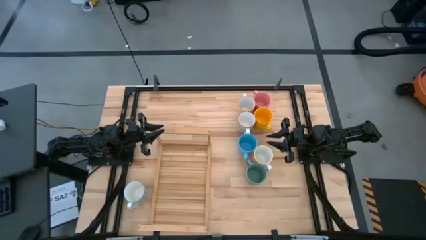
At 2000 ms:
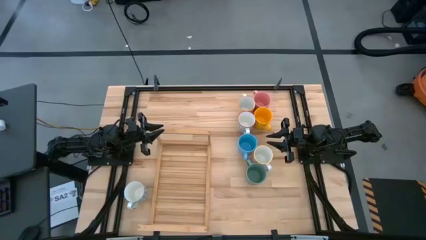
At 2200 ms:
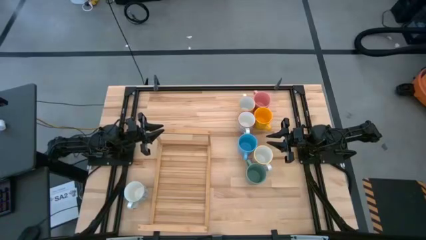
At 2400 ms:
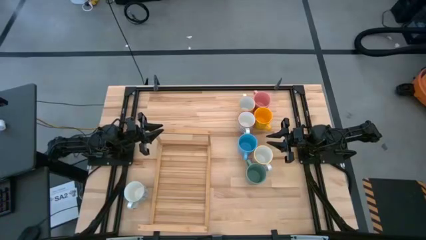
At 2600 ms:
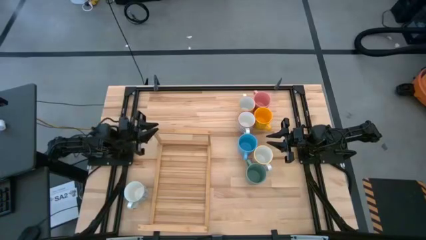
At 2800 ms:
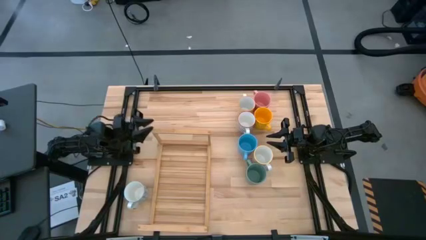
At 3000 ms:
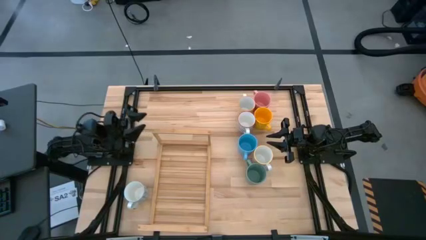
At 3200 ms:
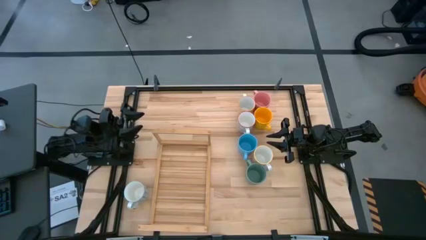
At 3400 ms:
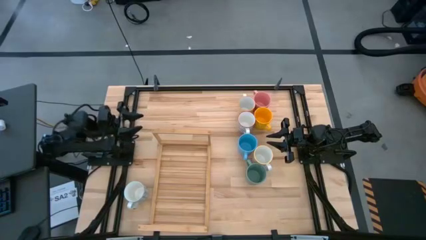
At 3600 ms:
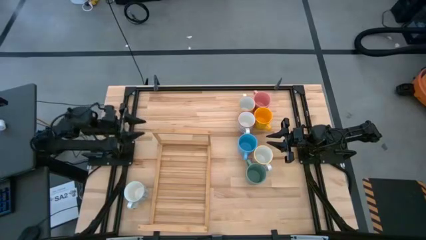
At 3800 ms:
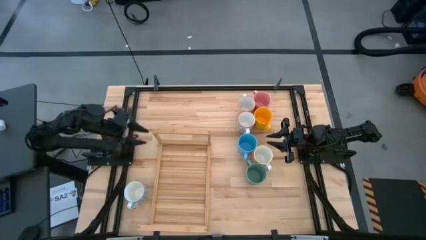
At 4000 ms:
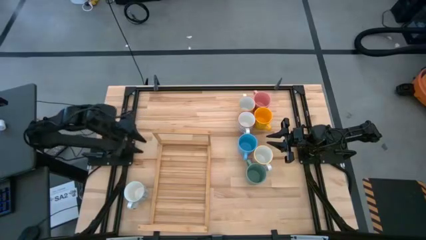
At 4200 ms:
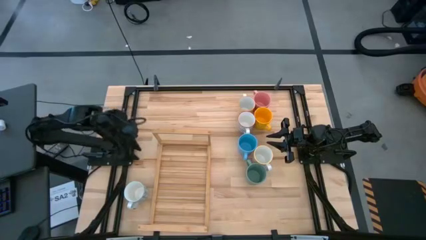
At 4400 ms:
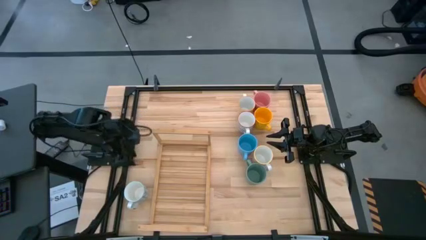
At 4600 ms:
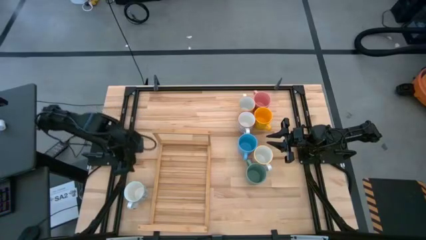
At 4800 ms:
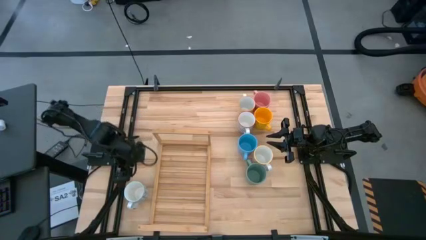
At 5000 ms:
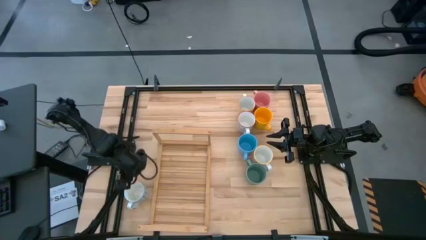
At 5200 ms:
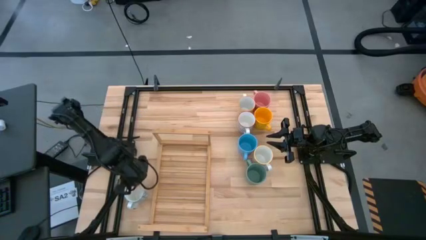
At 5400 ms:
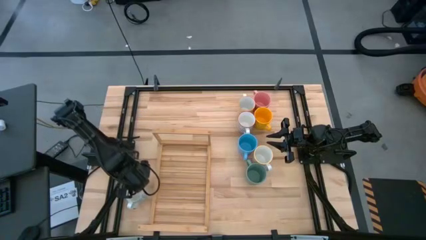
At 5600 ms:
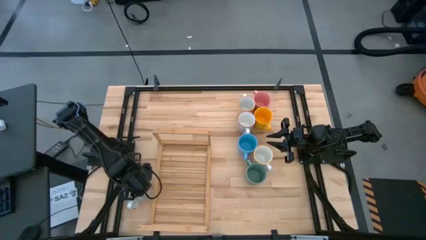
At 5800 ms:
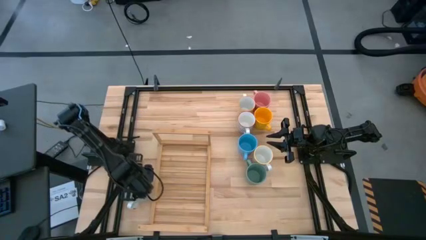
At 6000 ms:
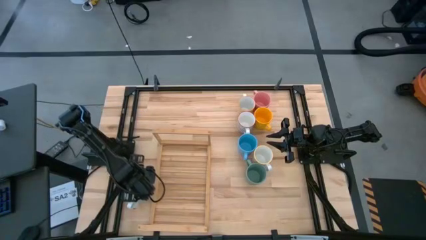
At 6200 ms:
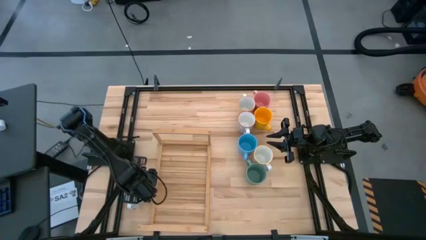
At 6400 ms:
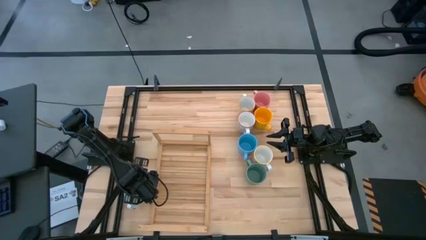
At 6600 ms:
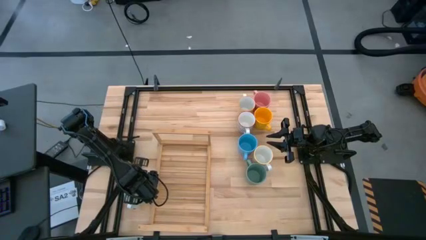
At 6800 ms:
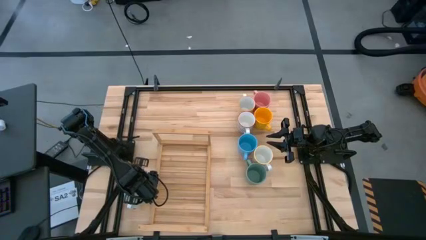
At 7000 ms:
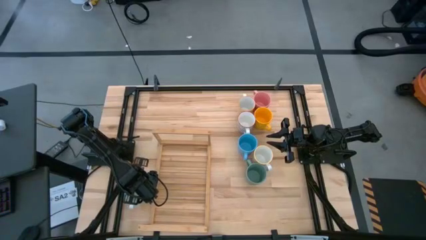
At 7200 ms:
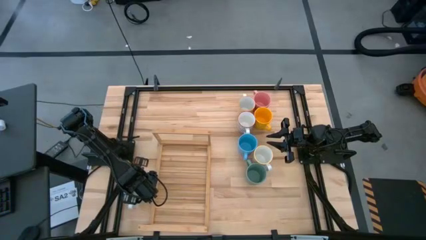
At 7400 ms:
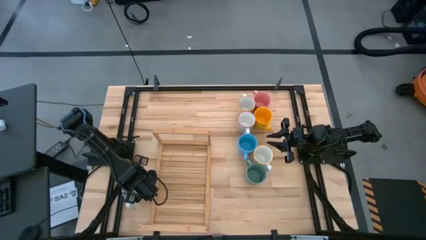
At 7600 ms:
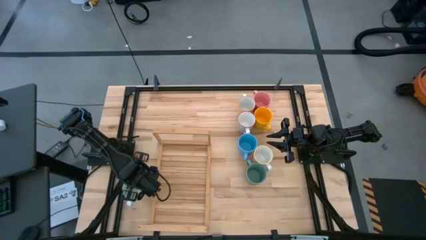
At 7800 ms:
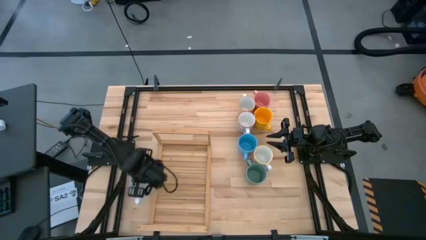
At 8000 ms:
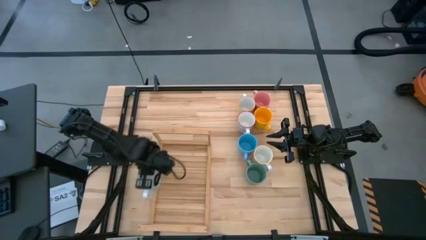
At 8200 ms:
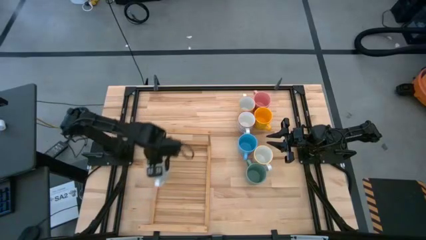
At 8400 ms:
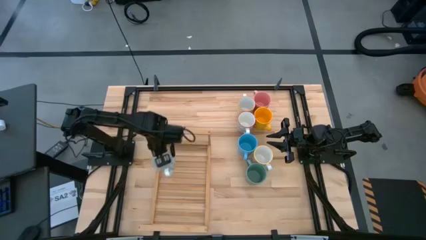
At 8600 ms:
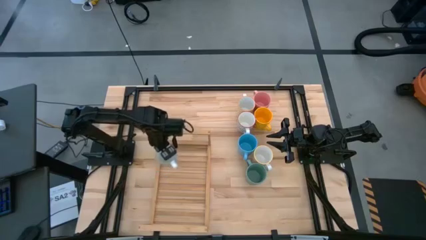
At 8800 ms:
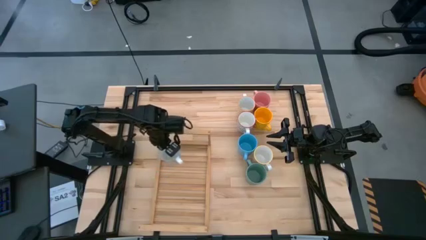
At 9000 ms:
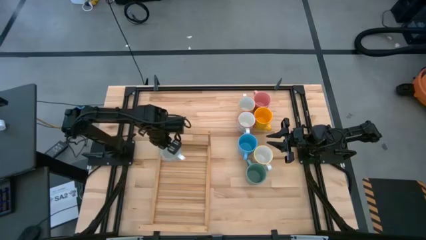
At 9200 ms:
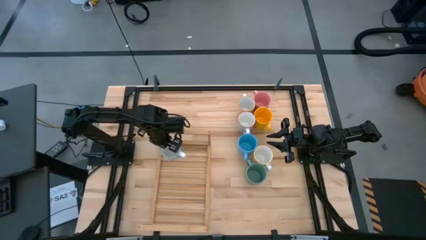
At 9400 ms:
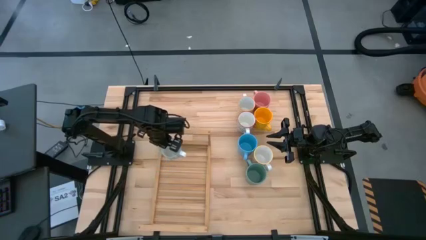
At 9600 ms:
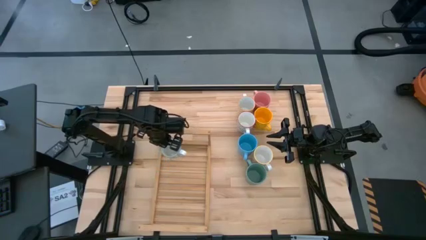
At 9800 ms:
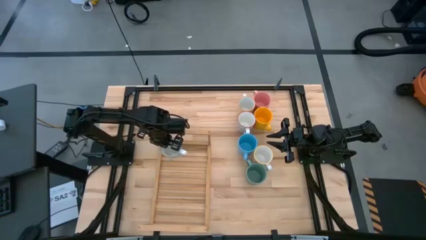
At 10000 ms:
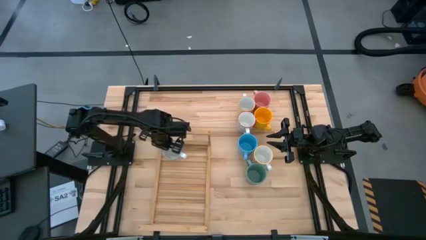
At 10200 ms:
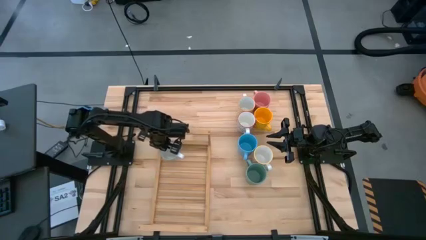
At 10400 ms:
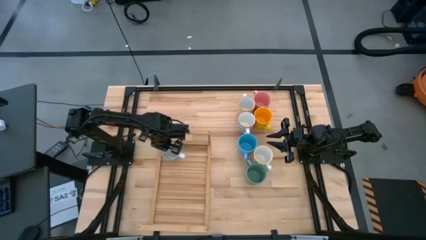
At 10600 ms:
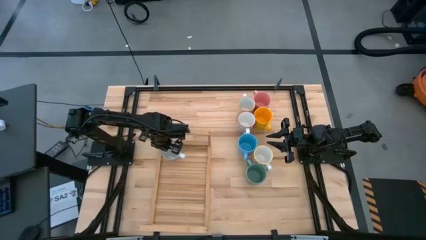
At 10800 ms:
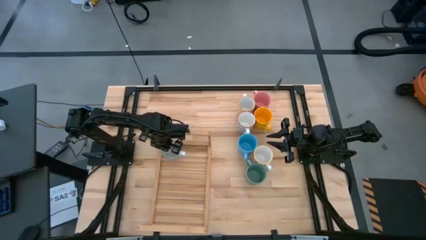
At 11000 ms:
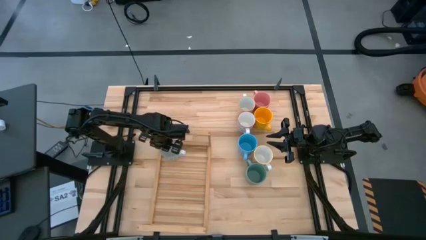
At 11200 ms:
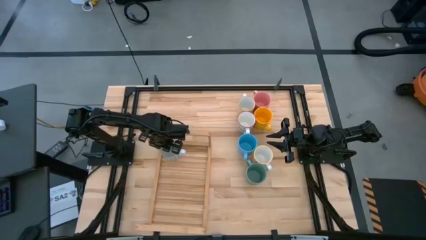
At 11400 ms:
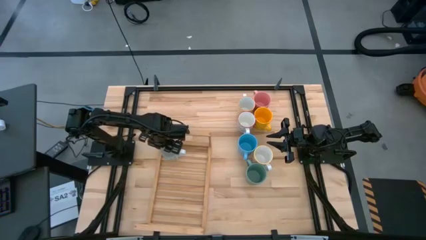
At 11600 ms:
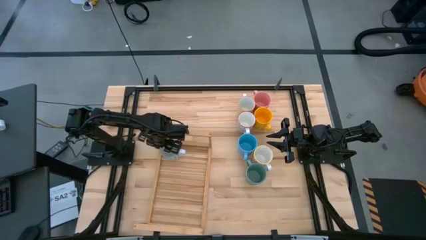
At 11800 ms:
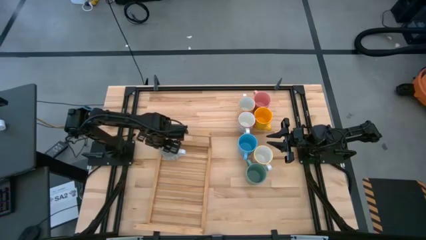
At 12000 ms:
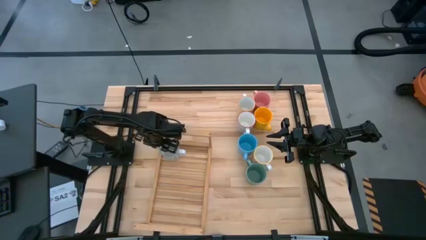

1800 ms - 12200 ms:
Task: Place coffee mugs
Put the blue and white mug on the shelf

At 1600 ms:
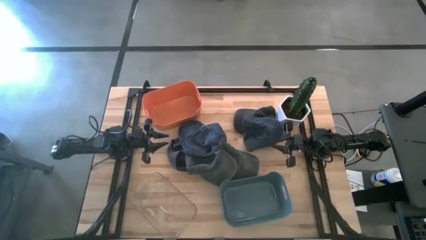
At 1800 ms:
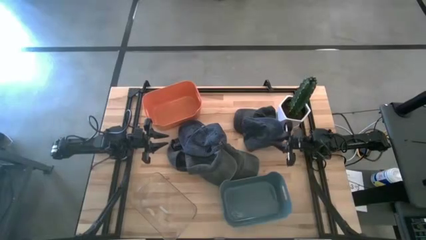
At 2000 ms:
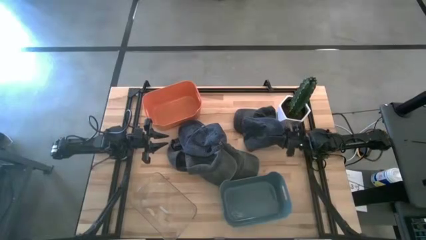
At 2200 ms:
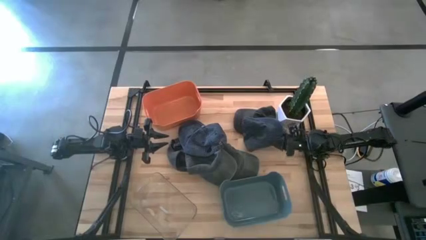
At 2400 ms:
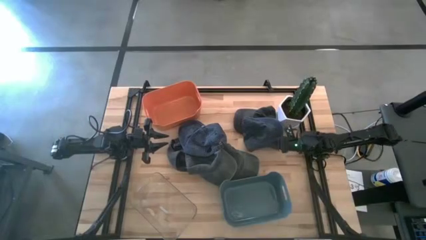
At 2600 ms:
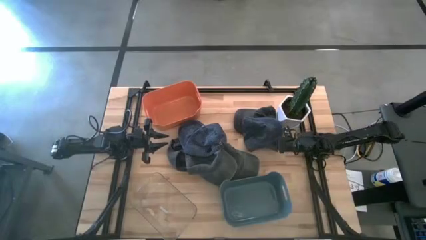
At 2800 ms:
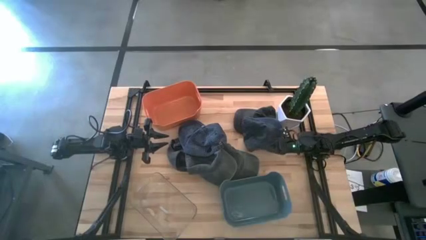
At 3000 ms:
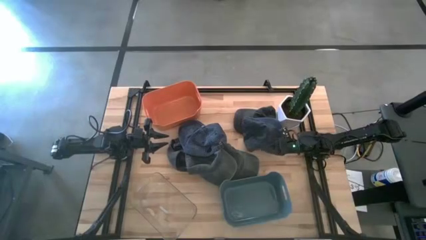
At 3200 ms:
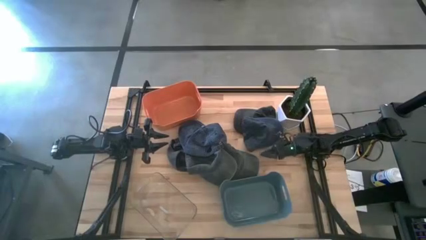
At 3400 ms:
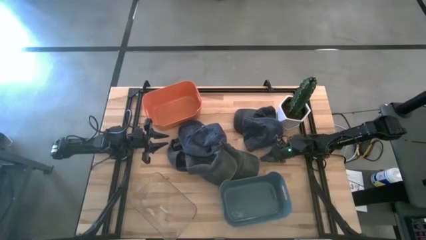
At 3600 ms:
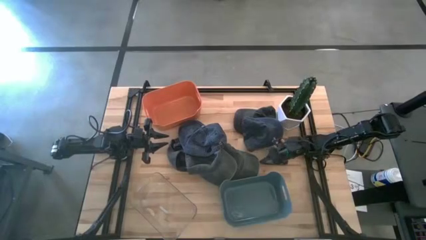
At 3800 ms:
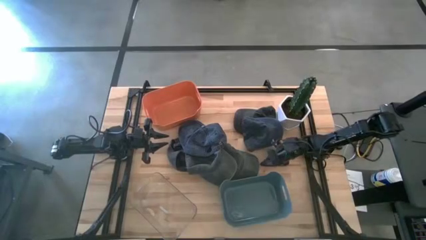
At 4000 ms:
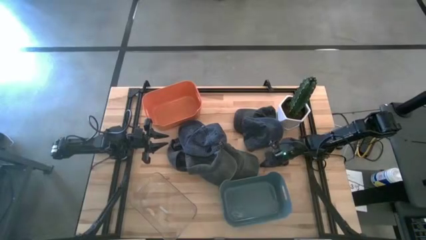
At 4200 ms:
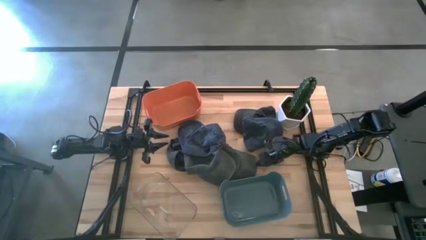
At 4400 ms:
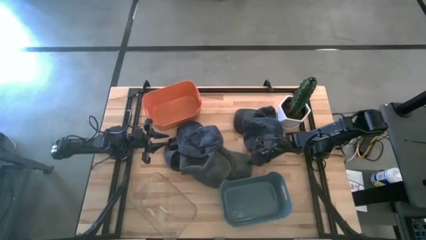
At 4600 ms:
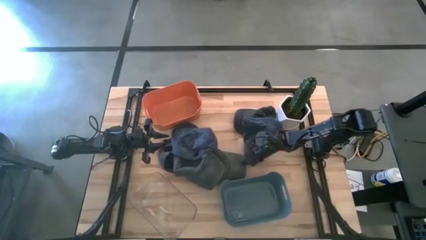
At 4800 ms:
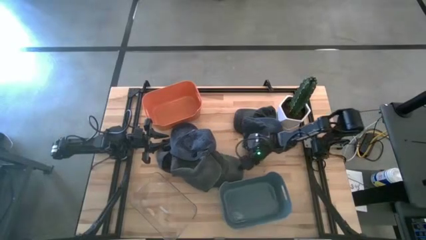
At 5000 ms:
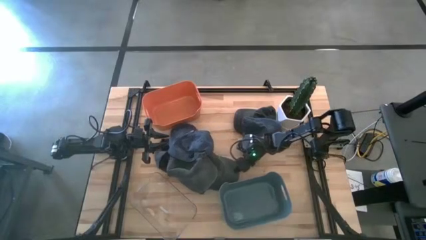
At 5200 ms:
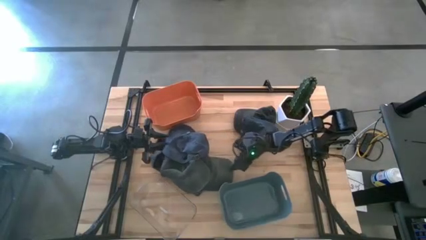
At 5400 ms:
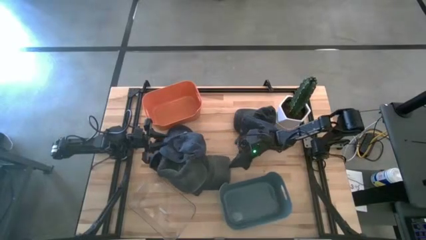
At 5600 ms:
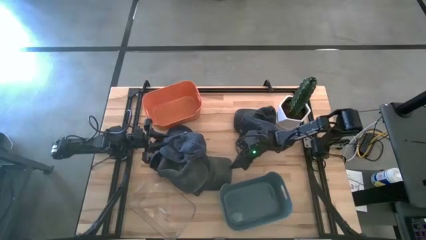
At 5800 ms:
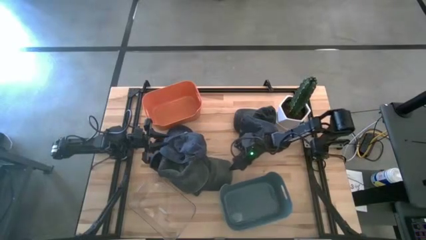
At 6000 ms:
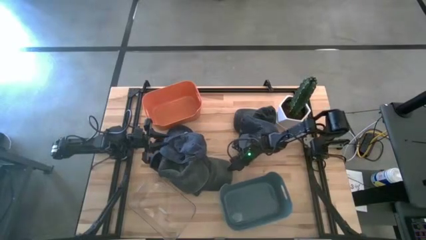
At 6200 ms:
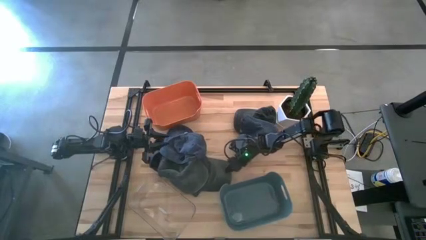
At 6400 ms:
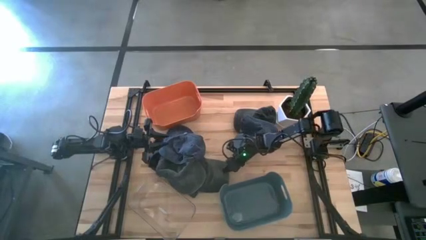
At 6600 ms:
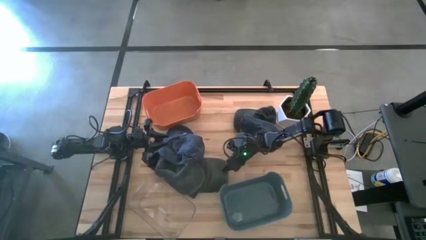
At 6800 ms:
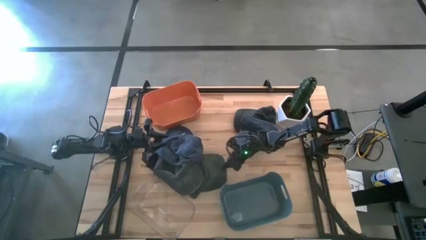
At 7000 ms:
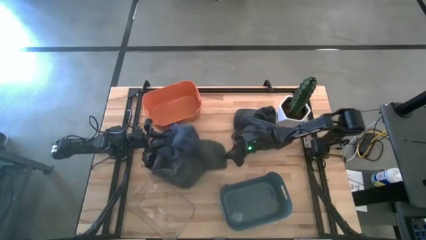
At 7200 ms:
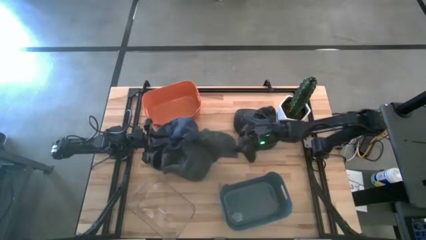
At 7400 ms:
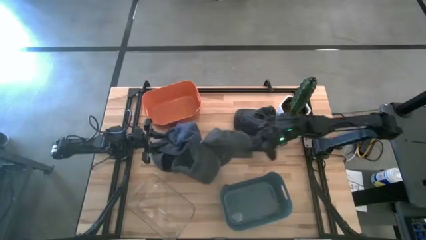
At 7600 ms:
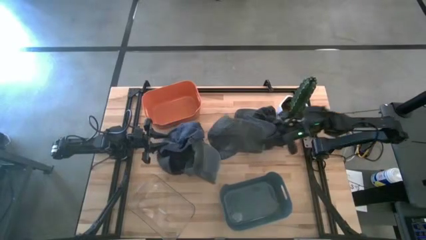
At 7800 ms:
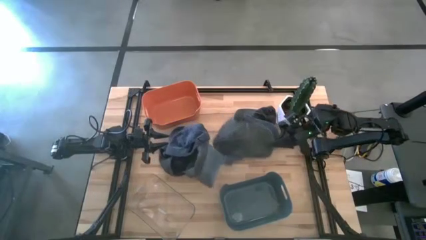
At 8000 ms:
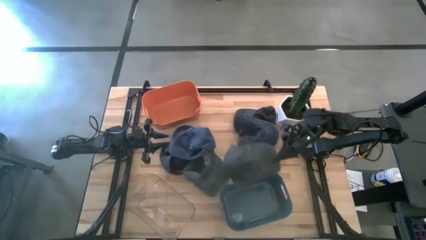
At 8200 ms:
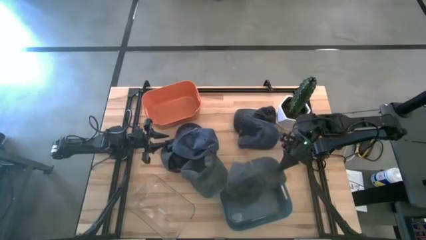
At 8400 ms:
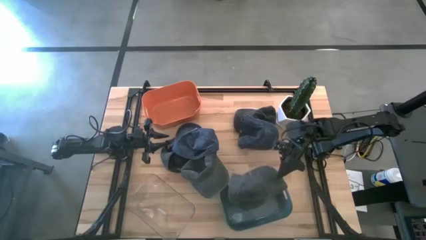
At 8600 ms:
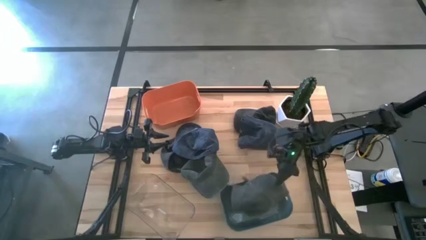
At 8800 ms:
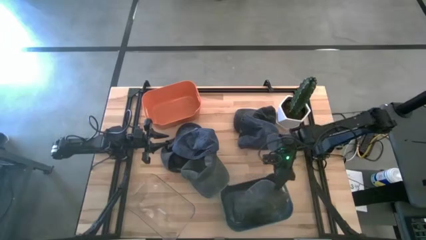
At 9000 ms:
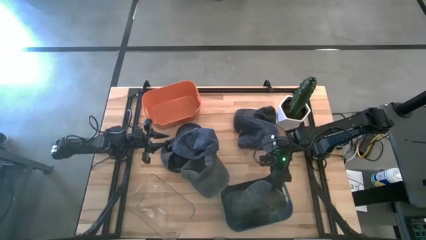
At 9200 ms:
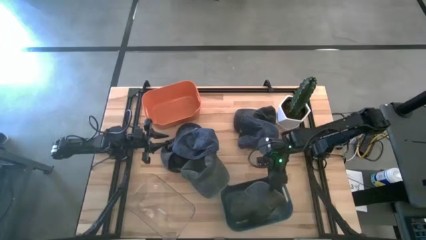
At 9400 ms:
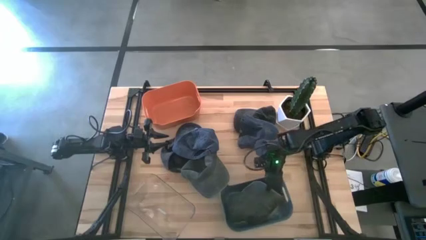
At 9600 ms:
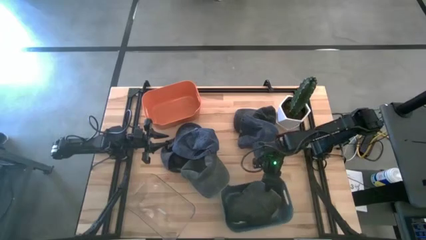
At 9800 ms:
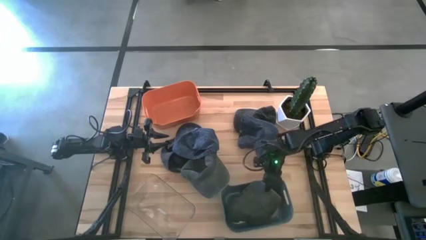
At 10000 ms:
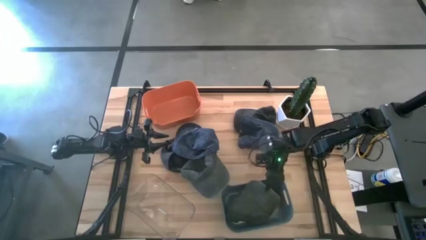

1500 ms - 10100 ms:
Task: Pick & Place hat
Put the right gray cap into the blue bin
